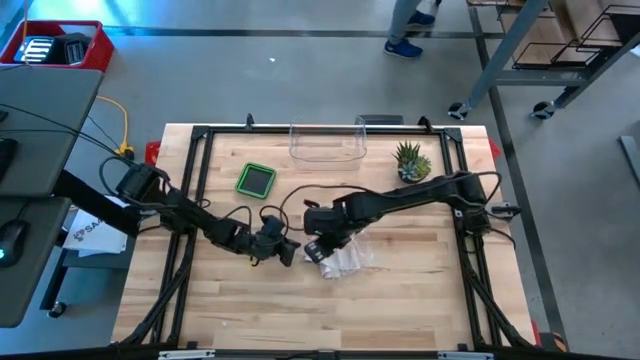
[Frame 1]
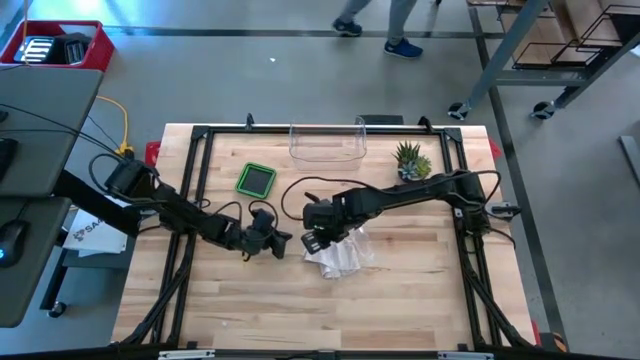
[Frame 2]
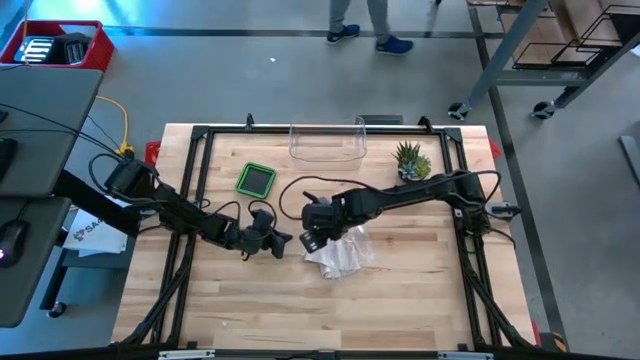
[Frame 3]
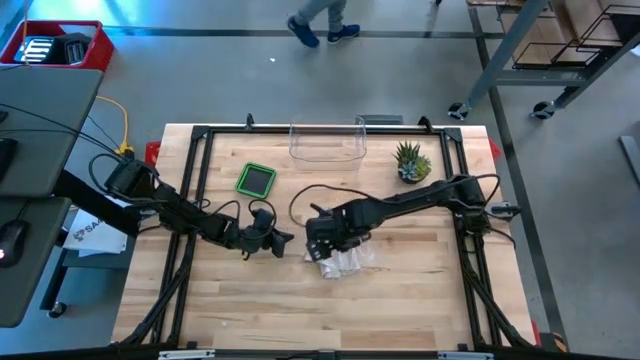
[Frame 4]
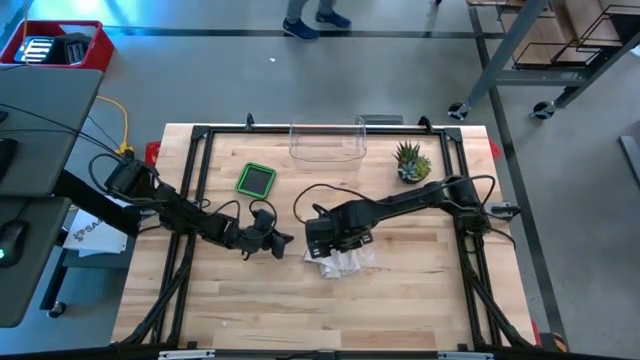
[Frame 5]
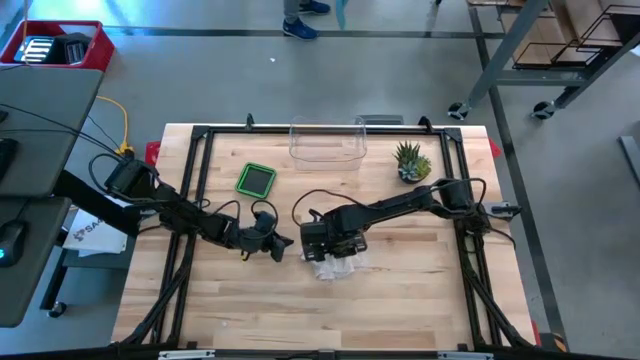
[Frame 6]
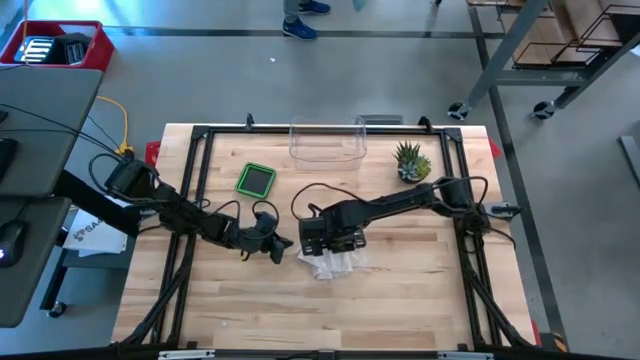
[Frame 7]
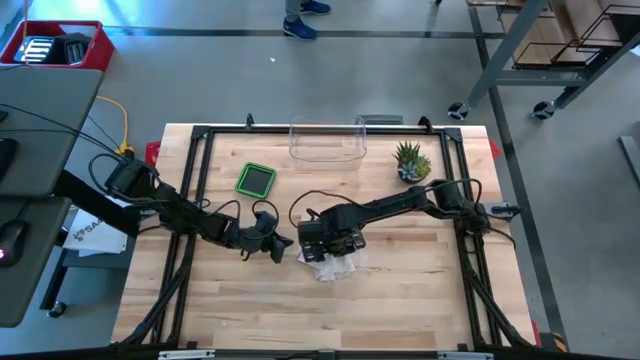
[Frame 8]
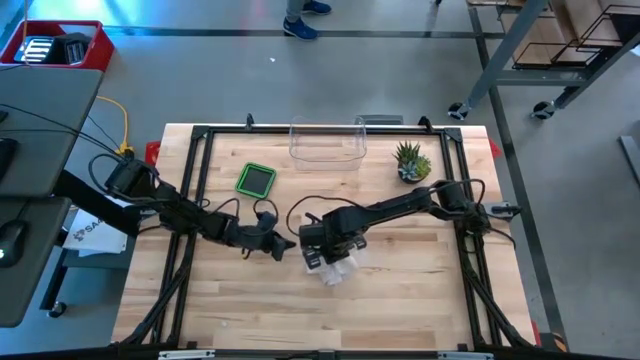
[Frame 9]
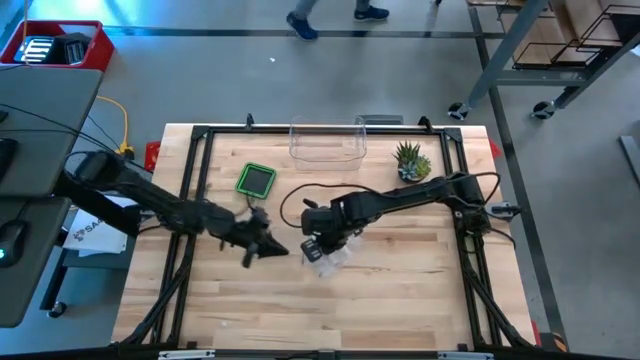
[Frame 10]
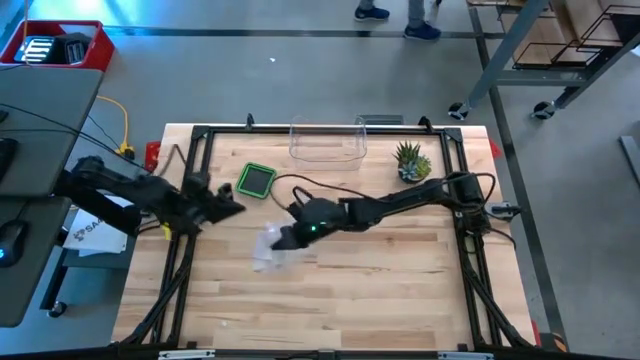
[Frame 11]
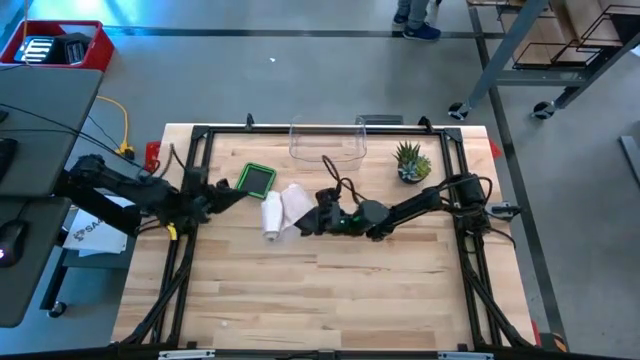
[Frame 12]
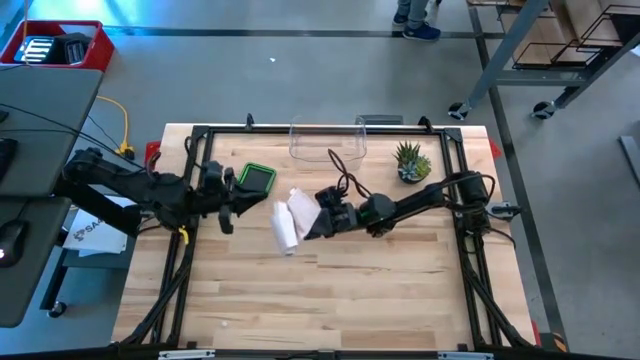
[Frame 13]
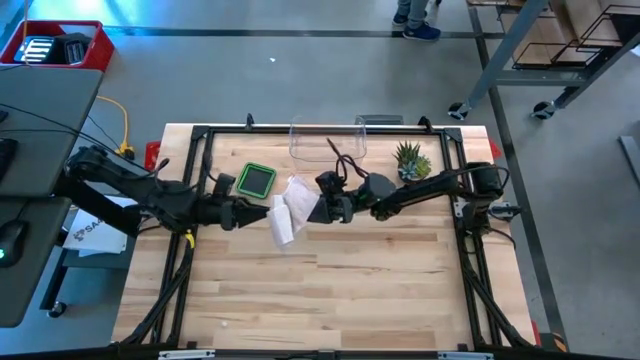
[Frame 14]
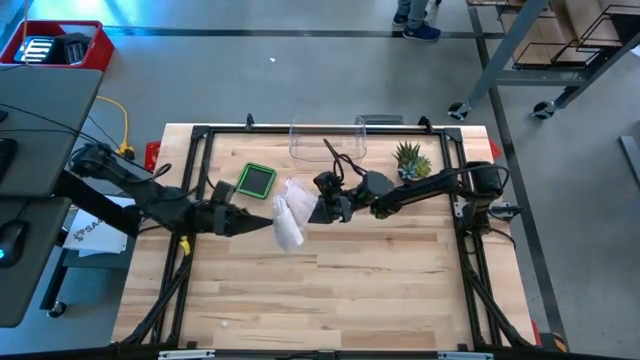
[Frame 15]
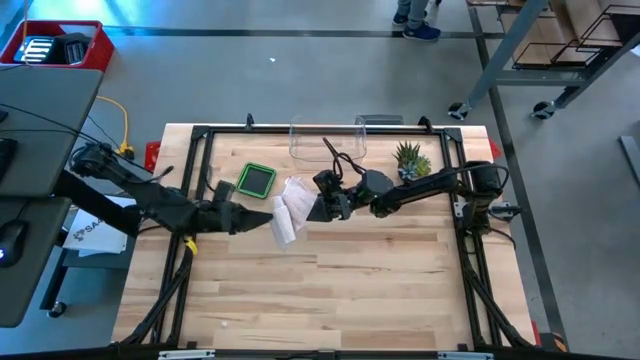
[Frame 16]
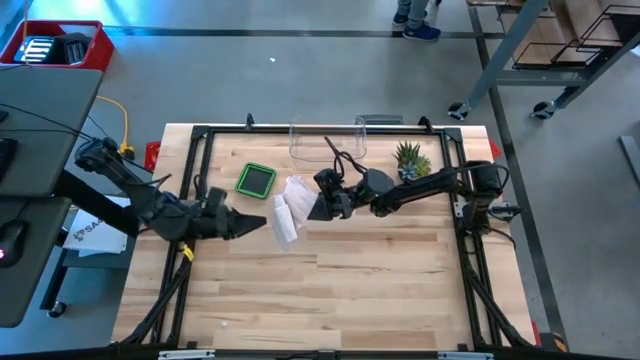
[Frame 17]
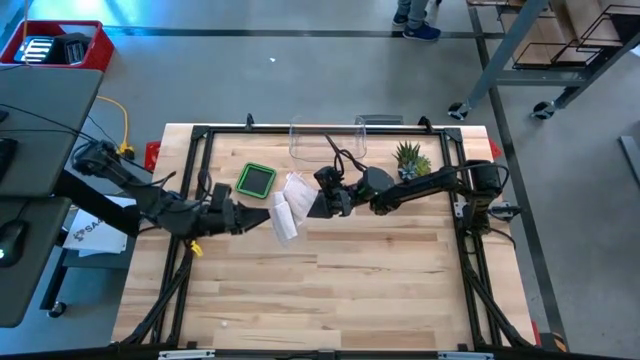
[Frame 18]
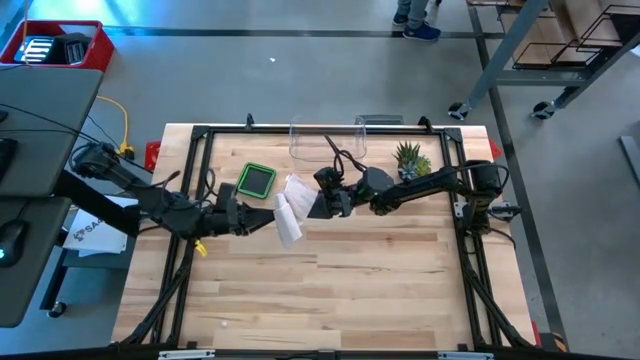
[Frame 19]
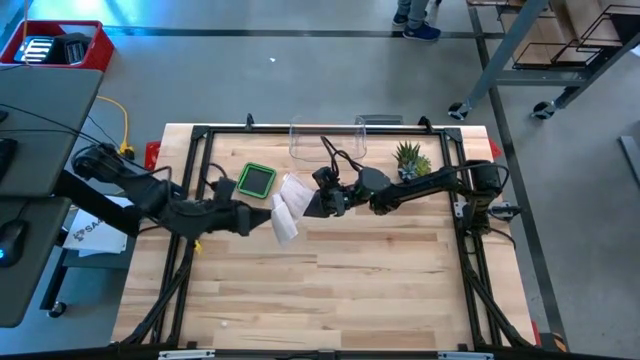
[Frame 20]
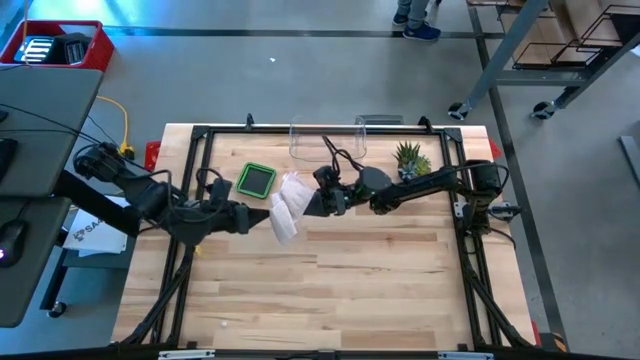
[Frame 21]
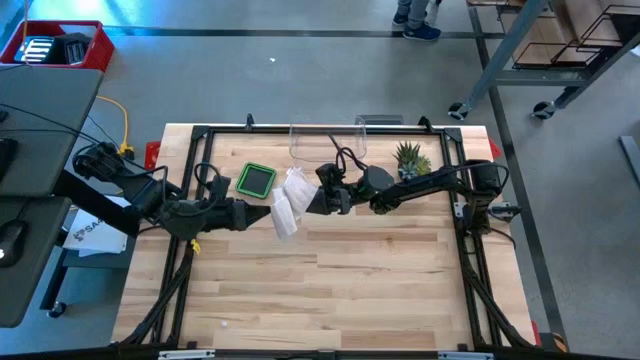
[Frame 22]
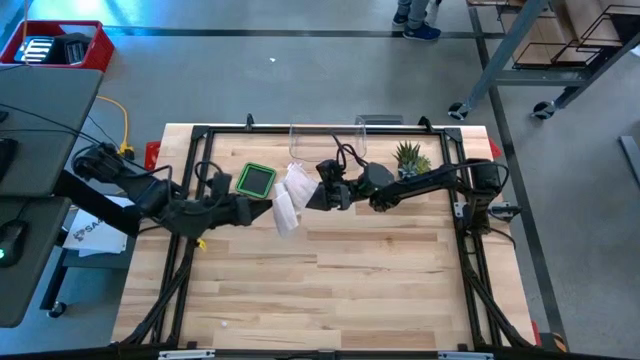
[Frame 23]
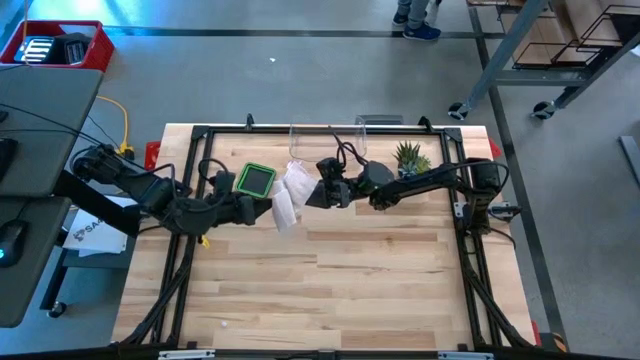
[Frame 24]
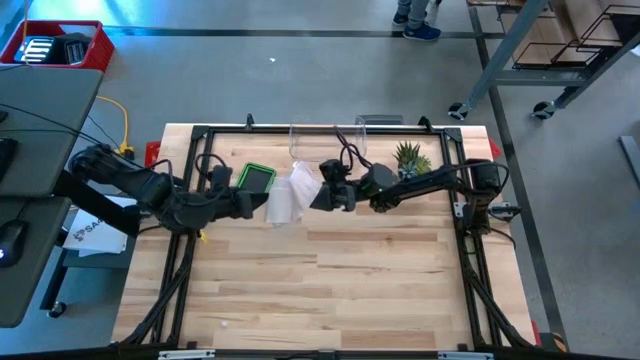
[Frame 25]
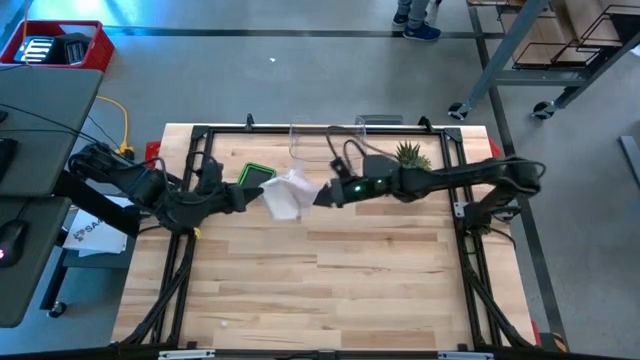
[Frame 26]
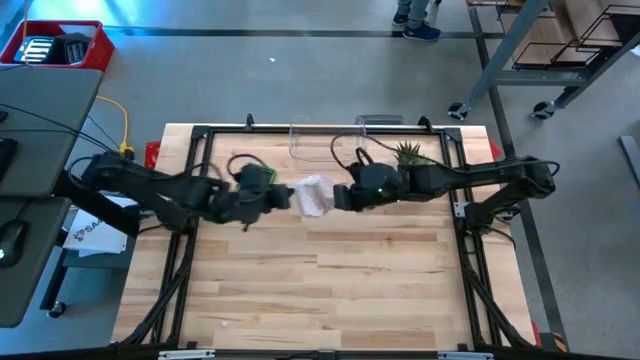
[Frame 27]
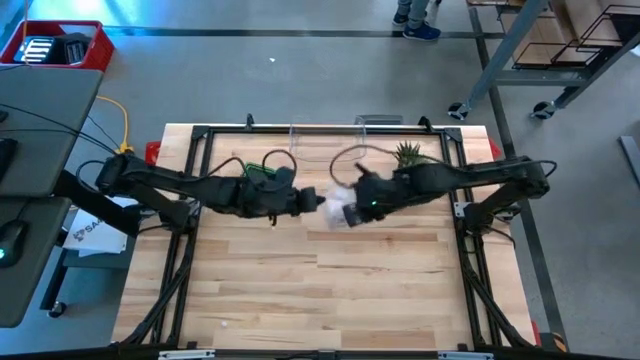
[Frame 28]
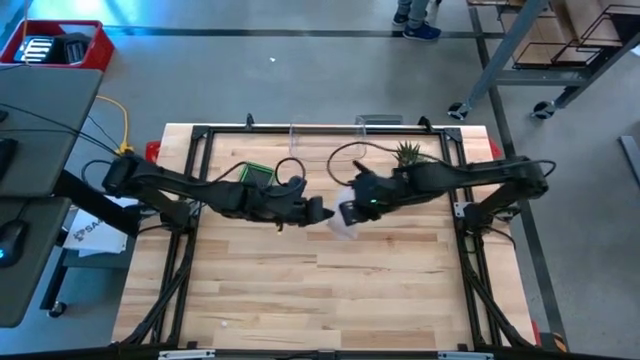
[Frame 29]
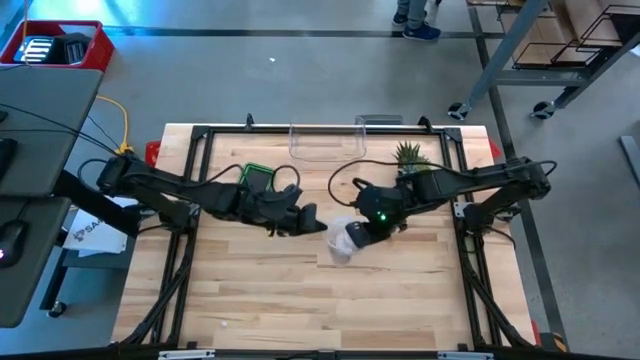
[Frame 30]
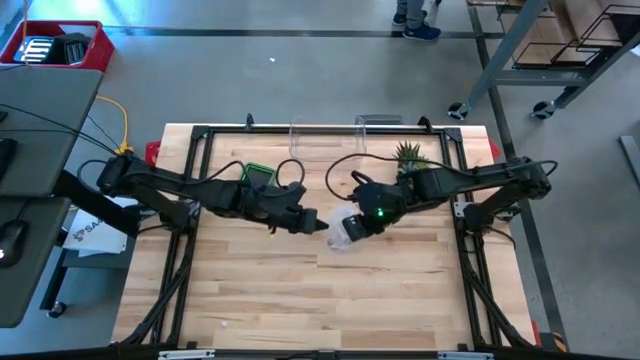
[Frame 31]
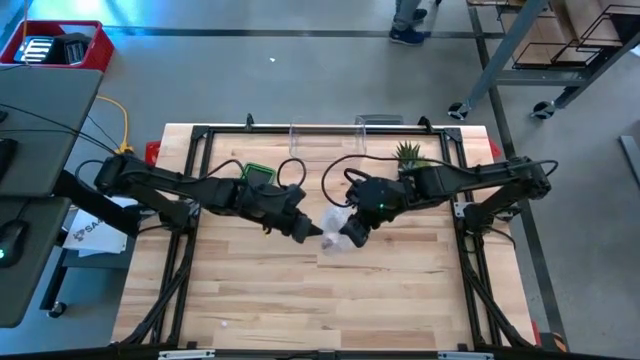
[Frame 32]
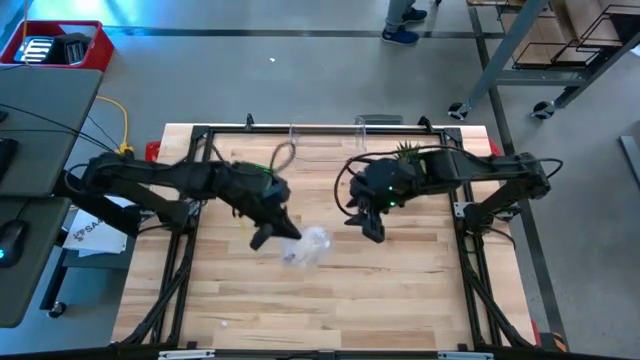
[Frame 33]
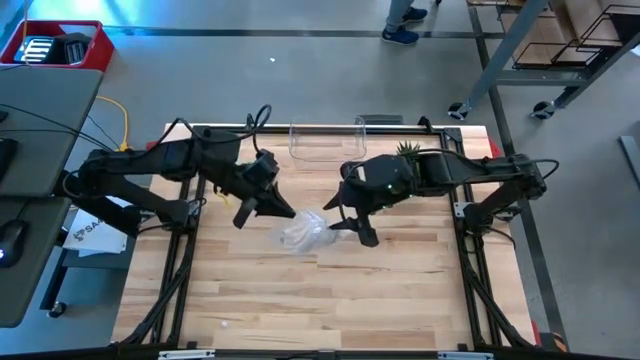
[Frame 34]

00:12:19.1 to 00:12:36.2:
Task: Roll bandage
Put the rolled bandage into the transparent zip bag

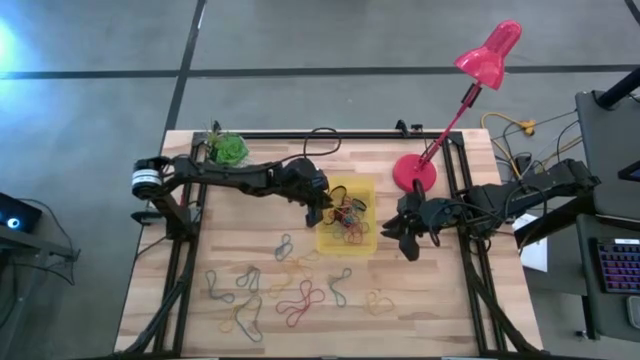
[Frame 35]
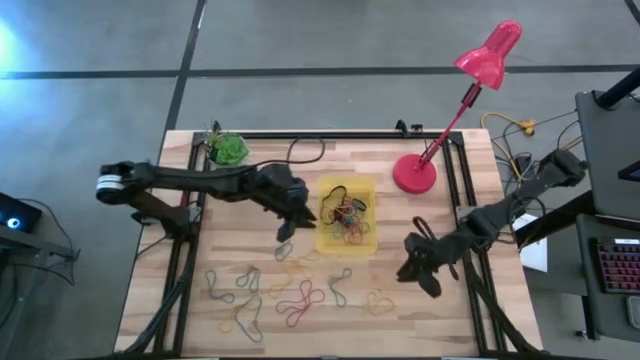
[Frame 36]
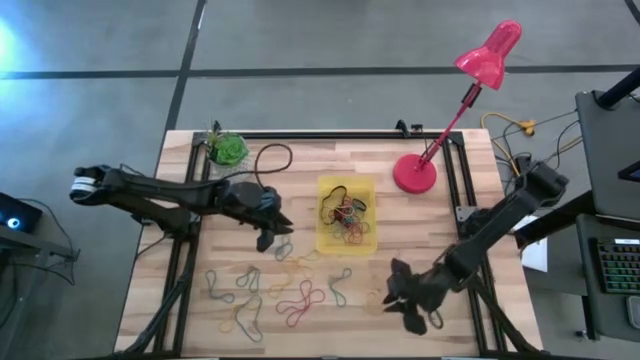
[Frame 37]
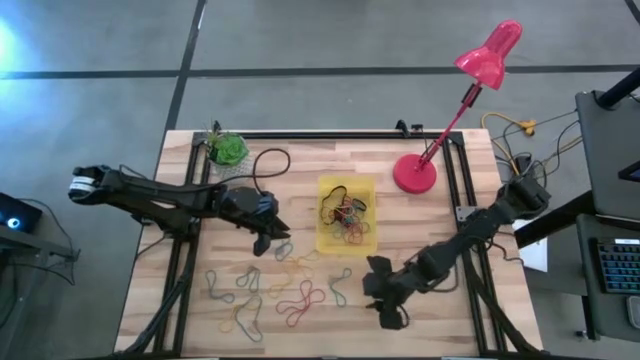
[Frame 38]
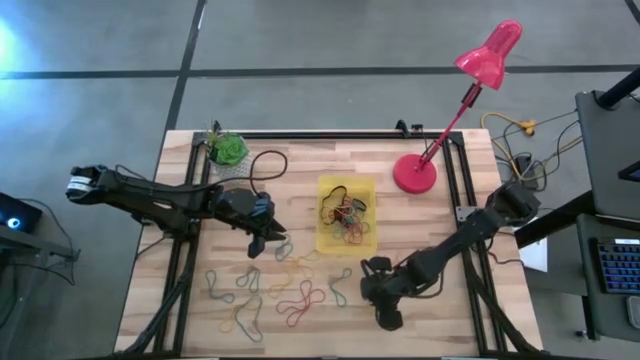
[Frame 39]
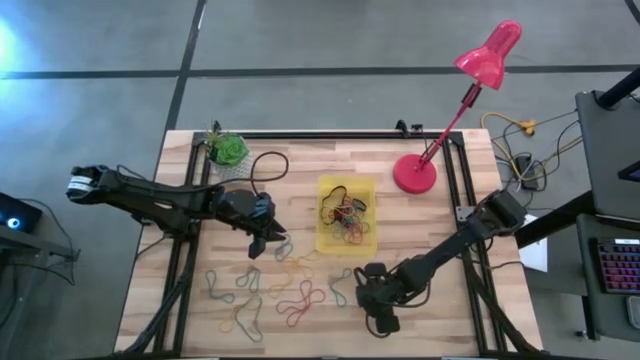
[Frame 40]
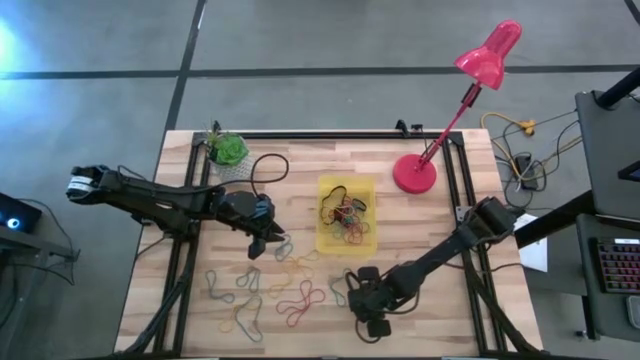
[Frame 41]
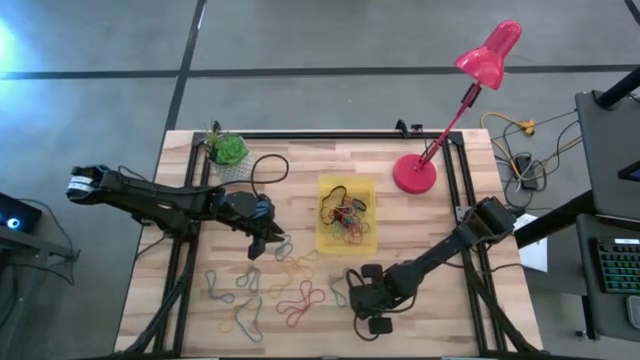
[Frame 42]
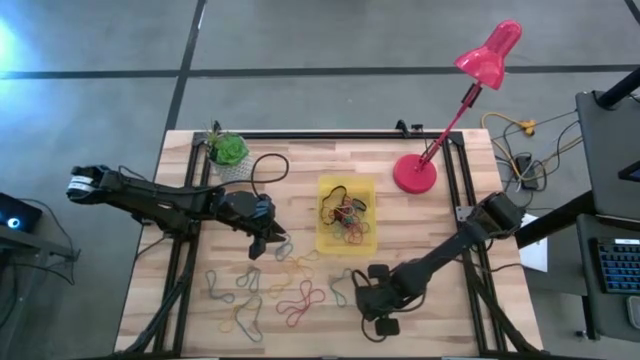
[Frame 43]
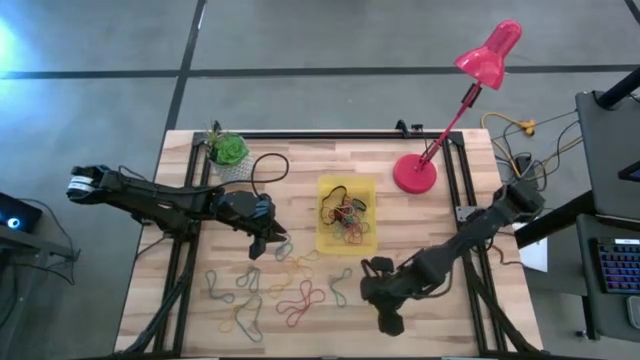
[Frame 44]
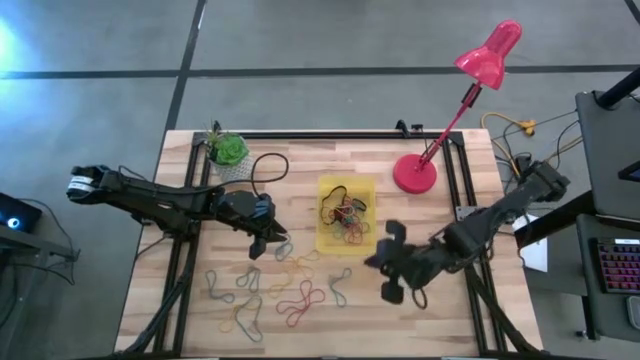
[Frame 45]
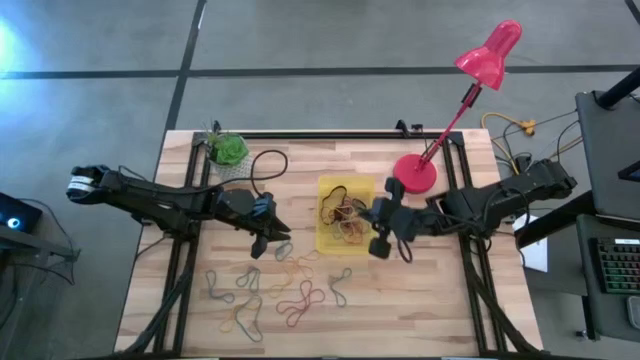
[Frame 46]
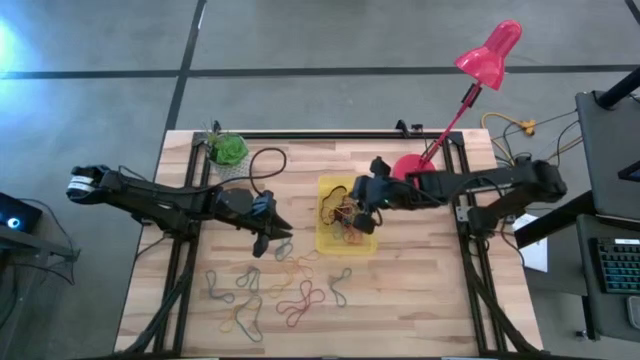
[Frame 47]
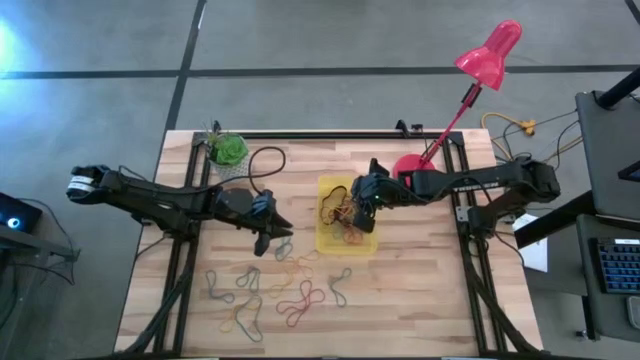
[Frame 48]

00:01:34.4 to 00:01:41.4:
Task: Pick and place rubber bands into bin
Put the yellow rubber band into the bin
